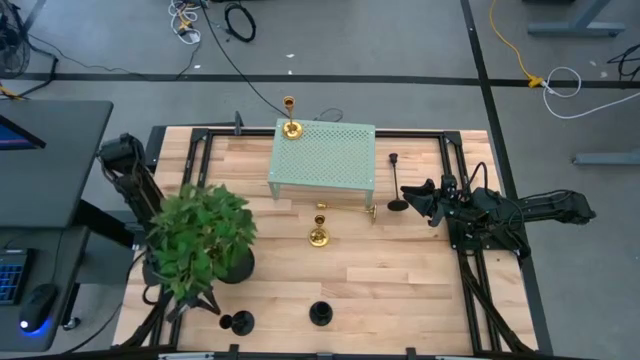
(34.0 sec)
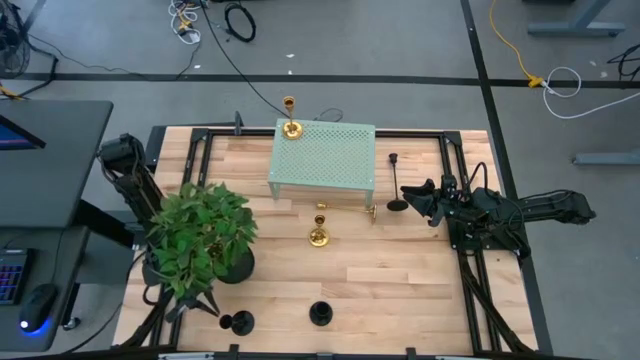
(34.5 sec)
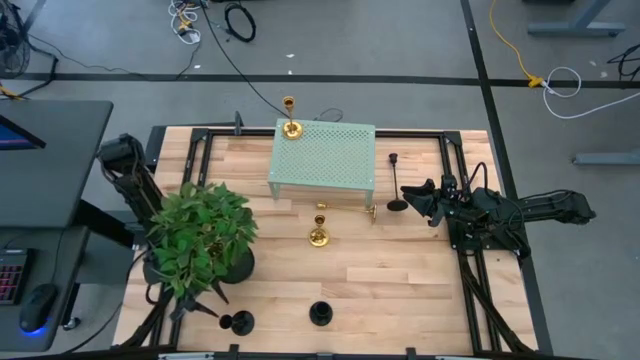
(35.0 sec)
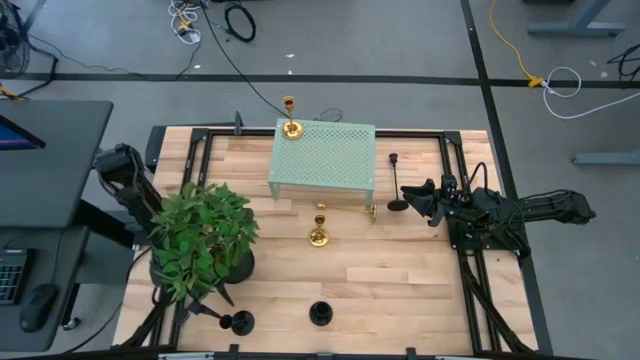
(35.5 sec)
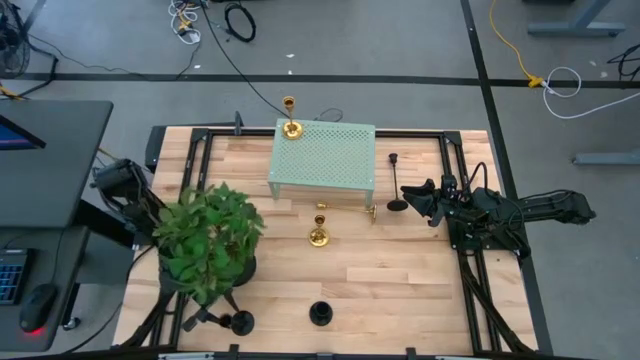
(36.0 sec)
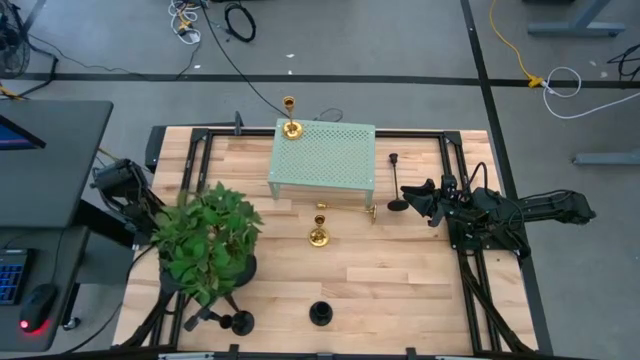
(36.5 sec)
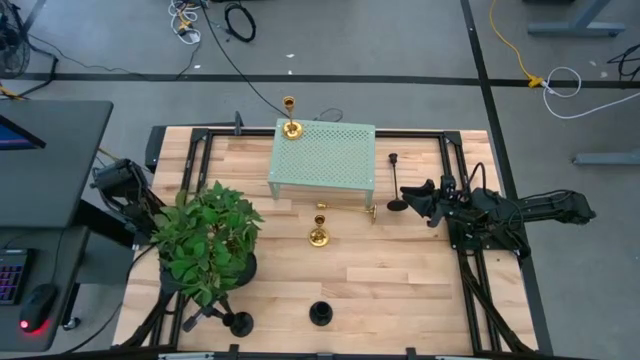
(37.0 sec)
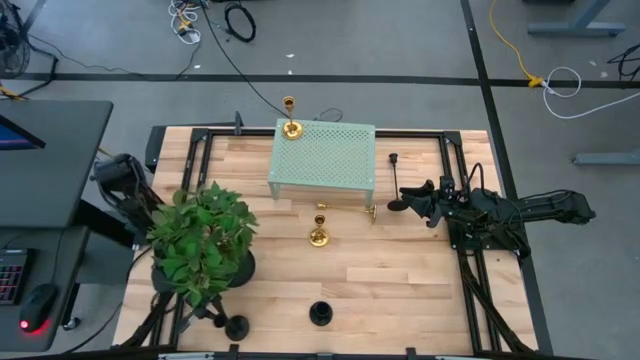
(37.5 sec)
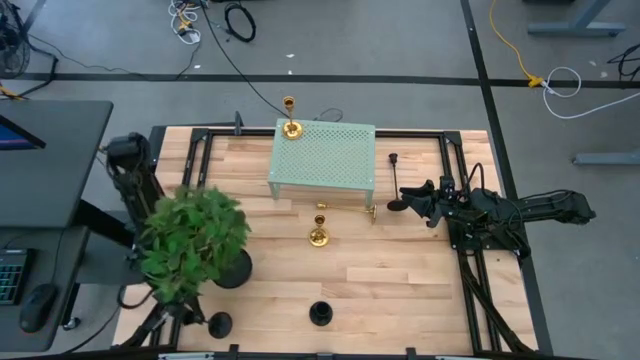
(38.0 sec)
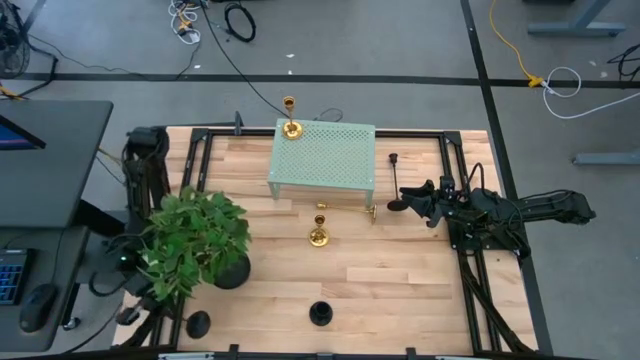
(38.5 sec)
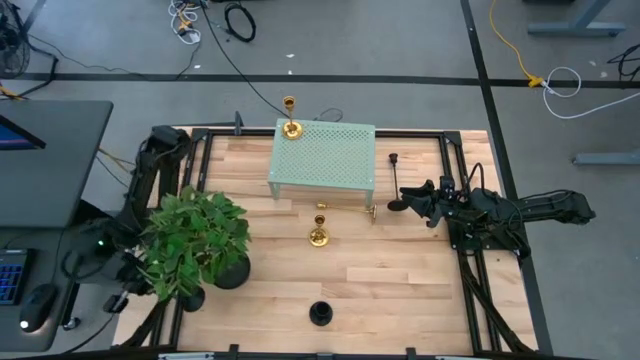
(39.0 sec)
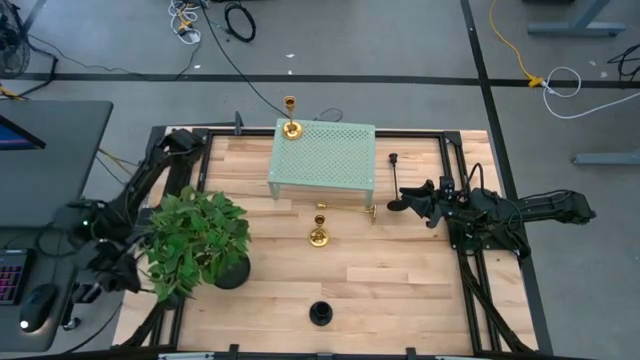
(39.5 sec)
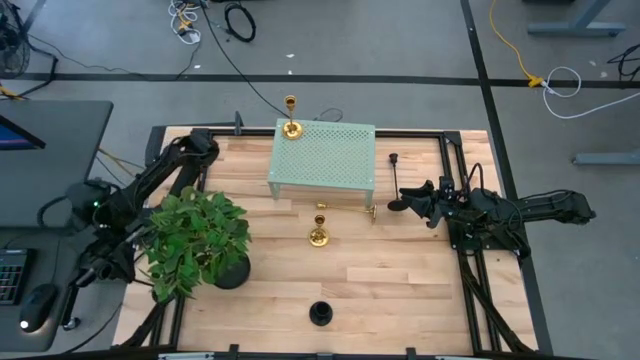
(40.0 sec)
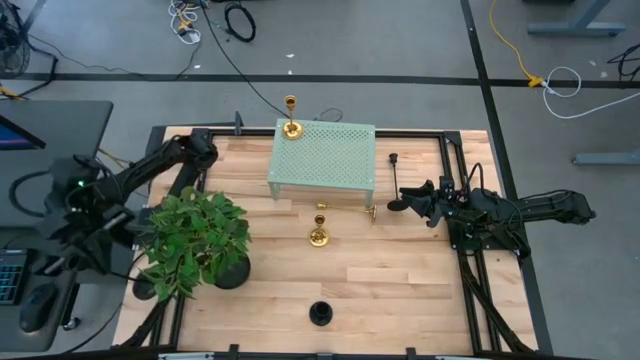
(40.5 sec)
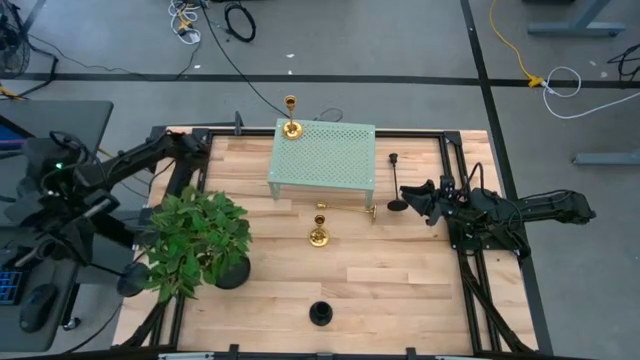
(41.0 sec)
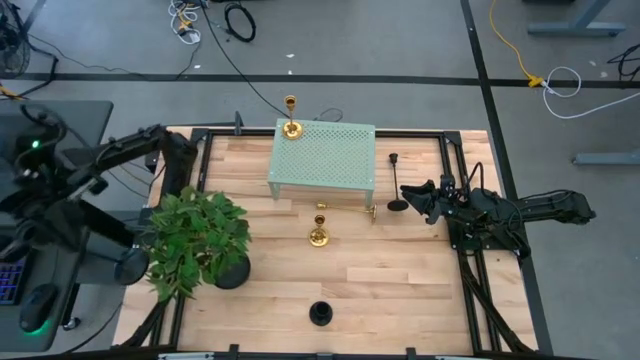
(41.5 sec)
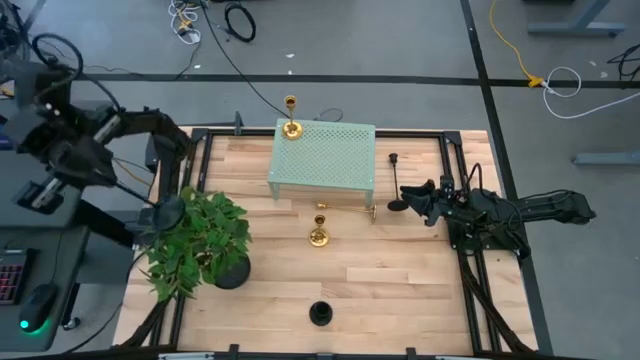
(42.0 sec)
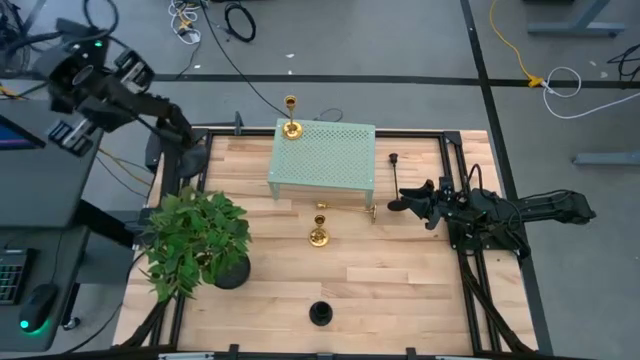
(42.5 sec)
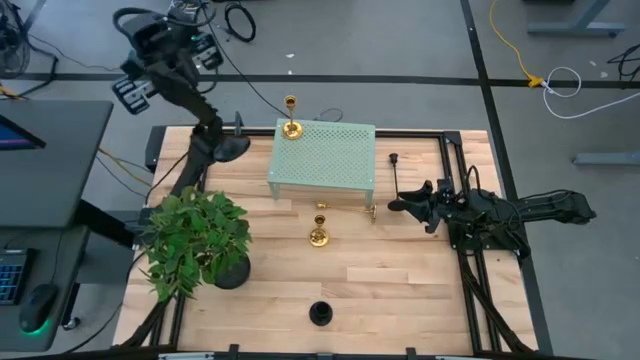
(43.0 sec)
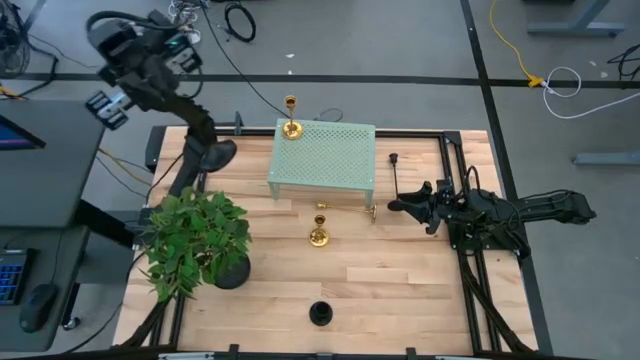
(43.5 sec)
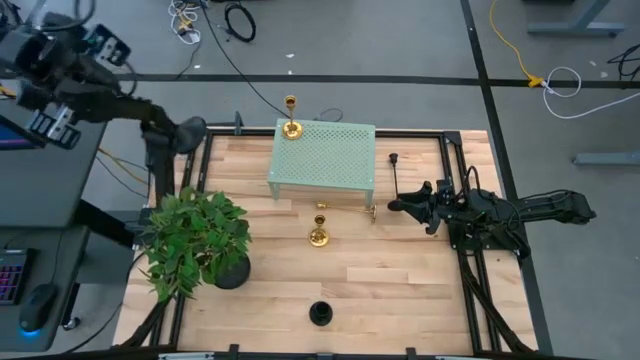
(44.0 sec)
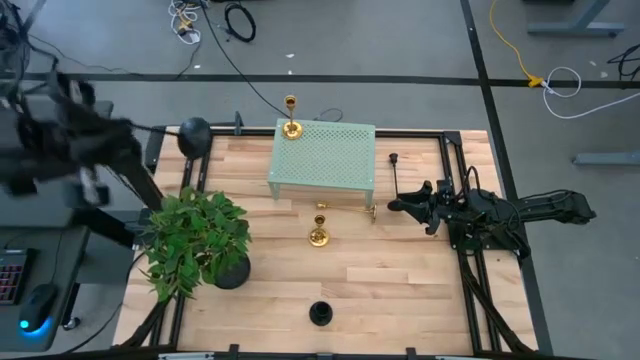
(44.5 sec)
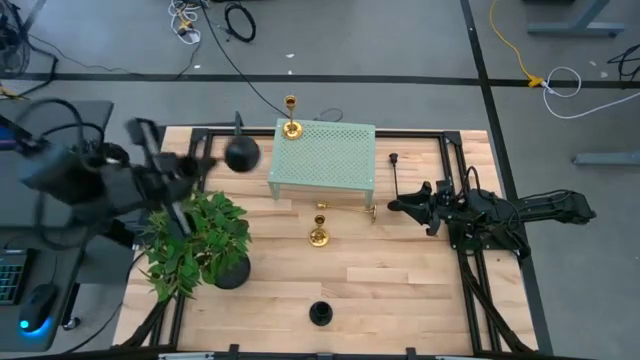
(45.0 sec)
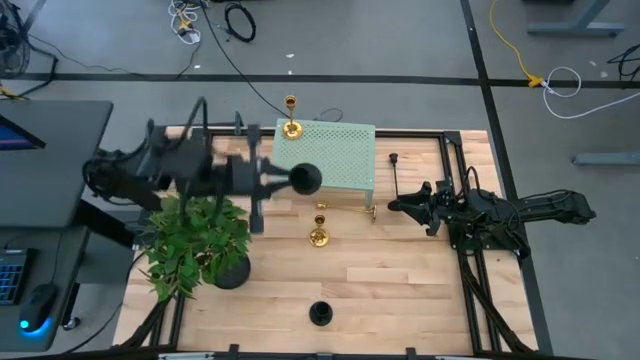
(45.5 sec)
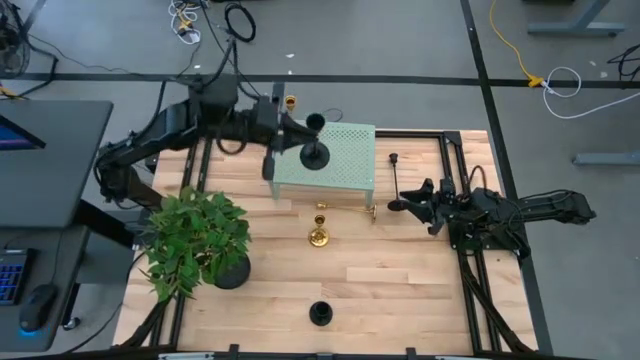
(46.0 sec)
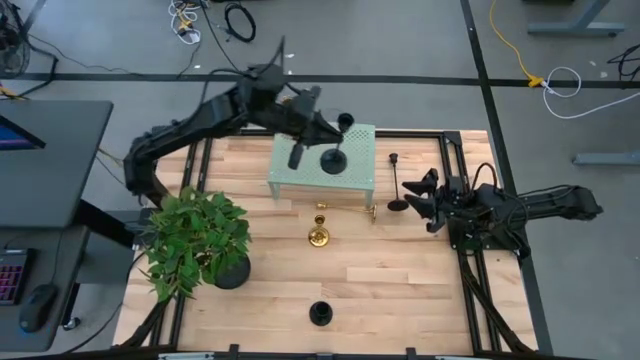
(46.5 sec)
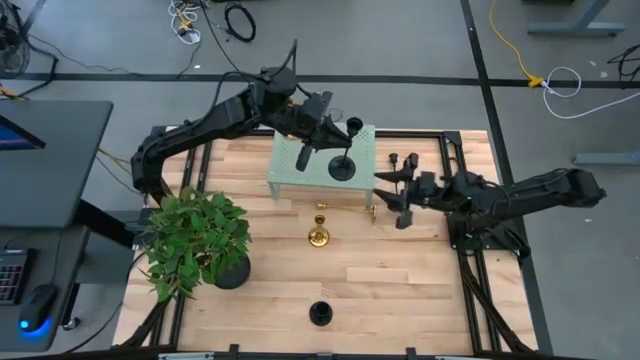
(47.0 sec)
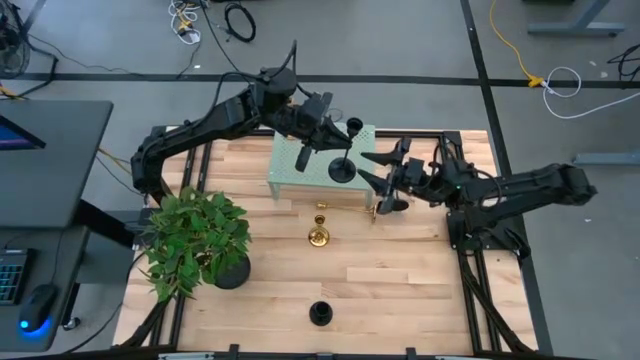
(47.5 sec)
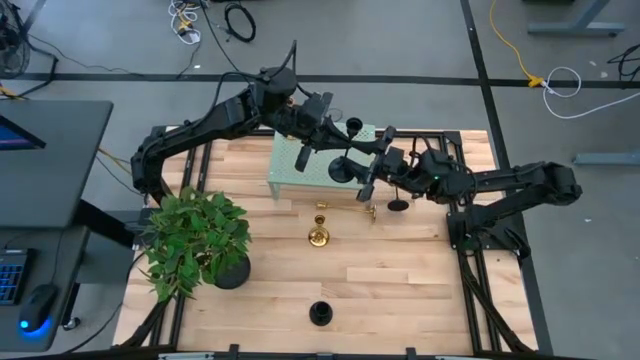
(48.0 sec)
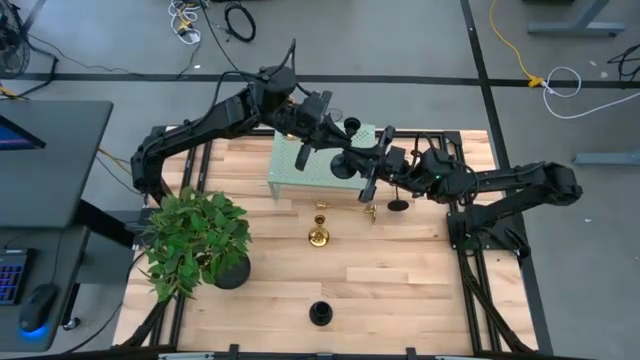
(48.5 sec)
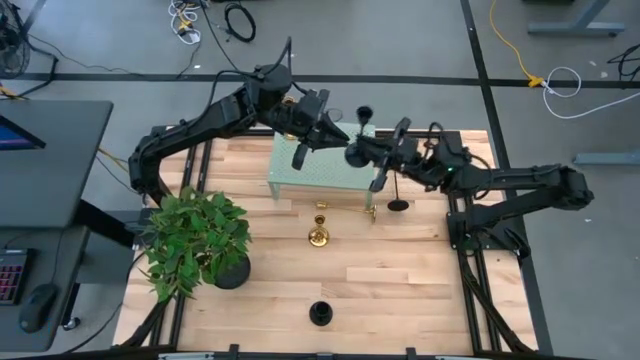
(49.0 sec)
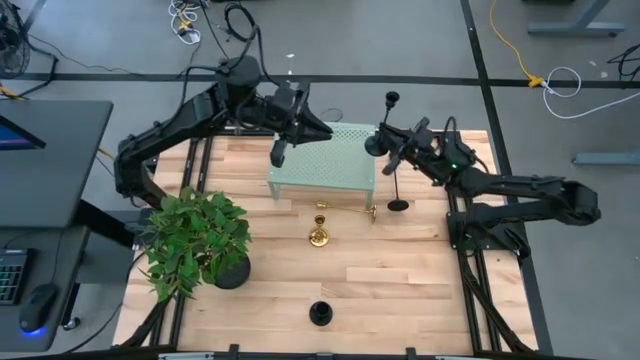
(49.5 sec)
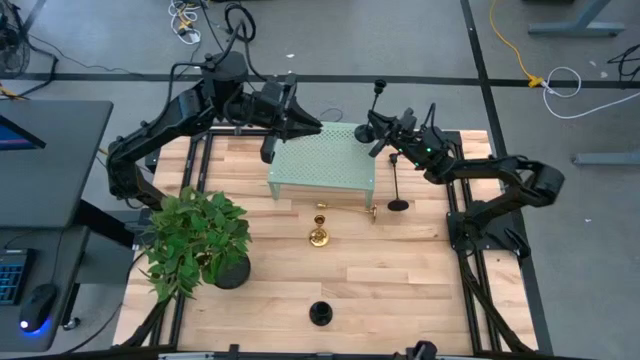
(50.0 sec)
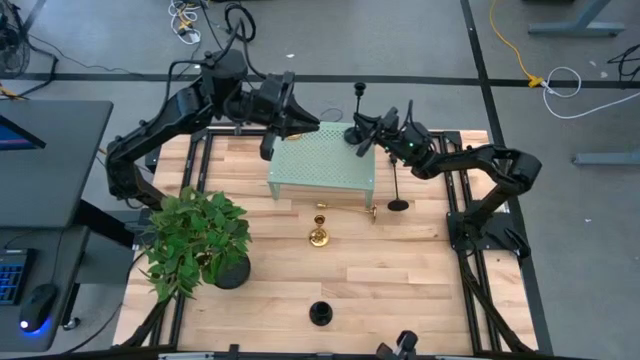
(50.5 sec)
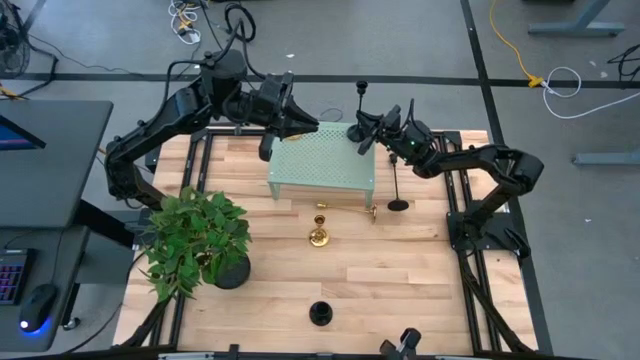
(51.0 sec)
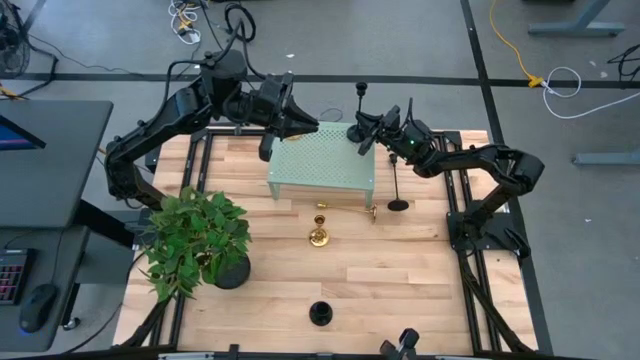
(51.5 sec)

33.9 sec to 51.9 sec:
Task: Pick & Place candle stick holders
Put the left black candle holder on the shelf

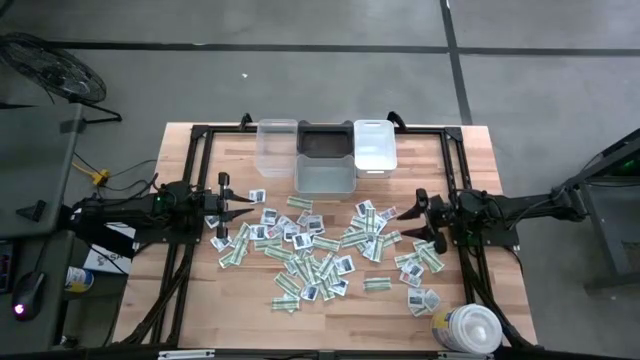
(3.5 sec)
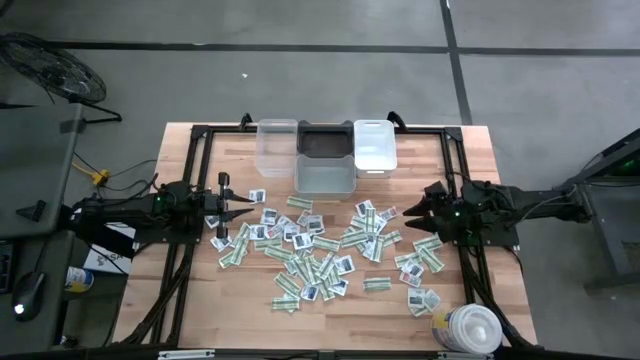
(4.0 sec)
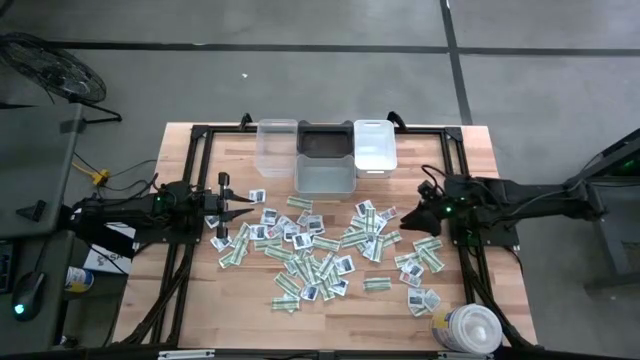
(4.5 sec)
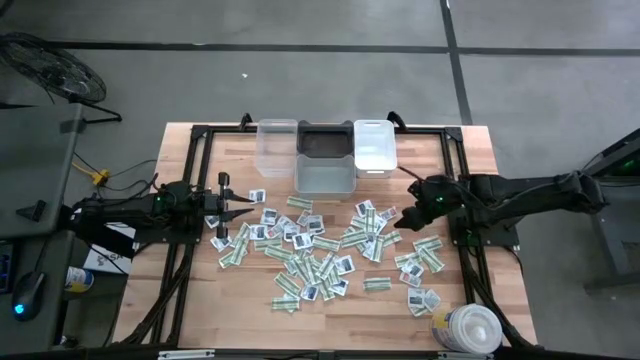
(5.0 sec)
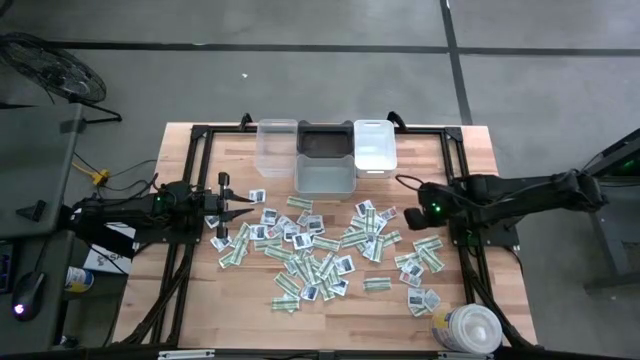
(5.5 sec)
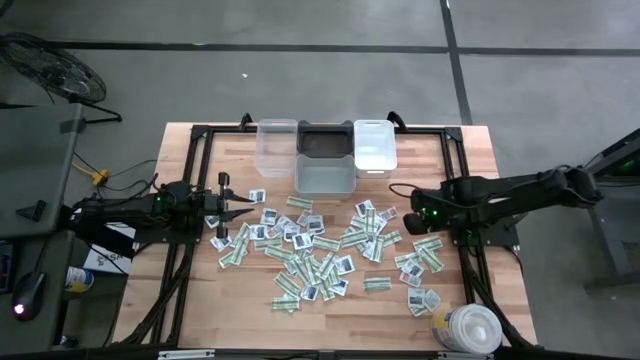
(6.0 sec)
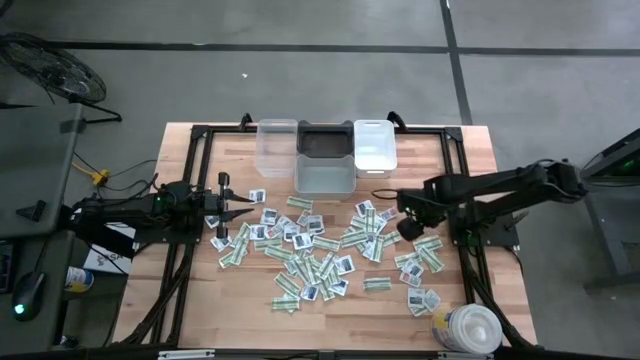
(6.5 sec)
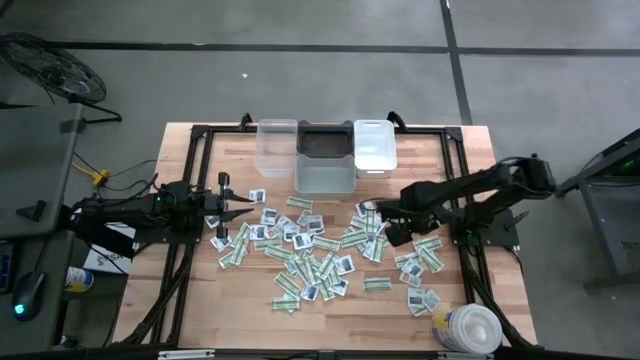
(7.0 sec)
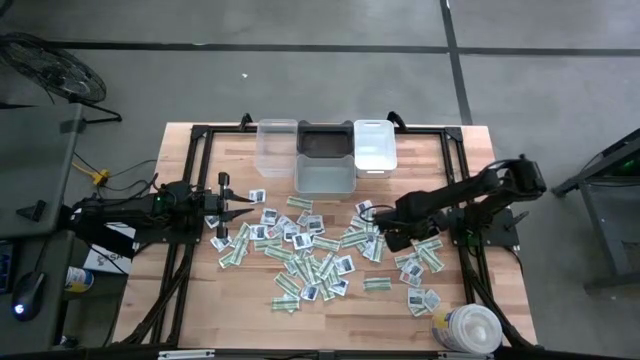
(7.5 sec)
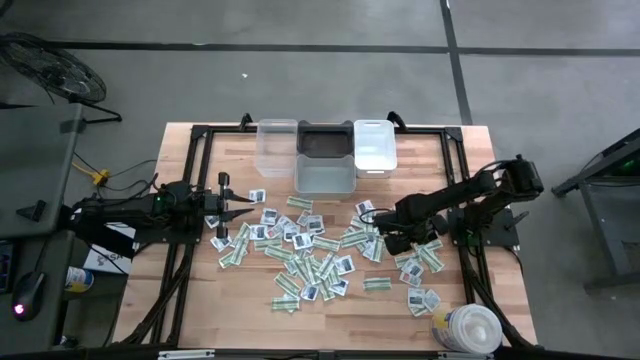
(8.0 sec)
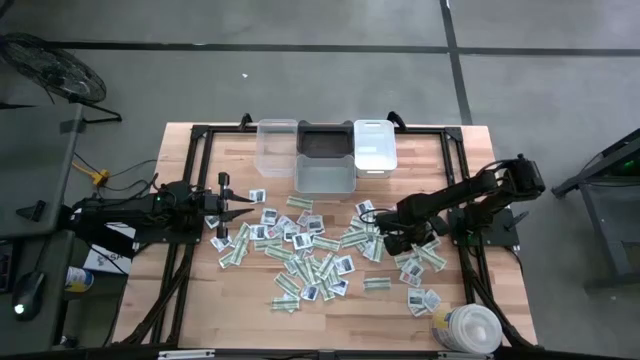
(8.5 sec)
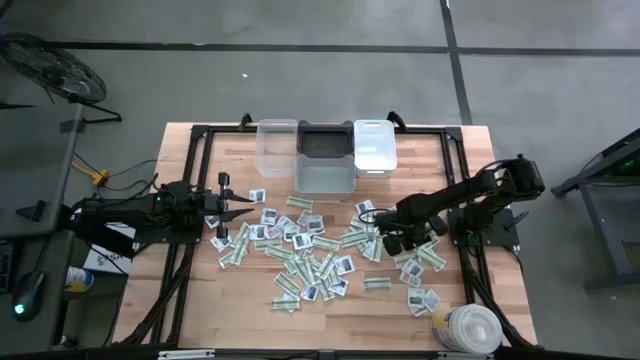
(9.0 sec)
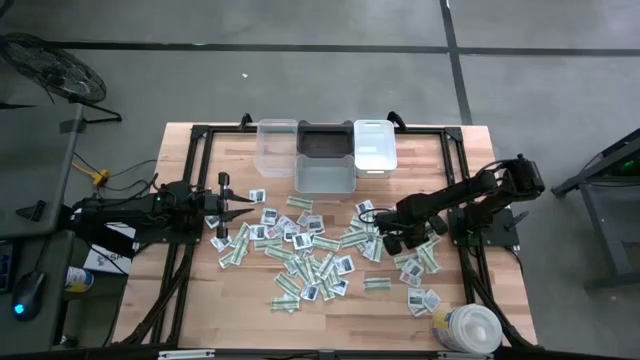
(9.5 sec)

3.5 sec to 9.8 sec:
Task: Pick & Place First Aid Supplies
Put the bandage pack into the gray bin
